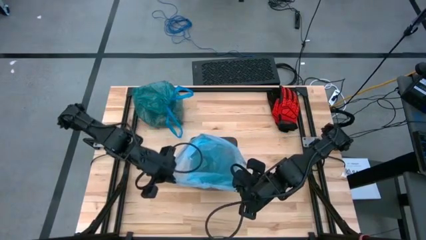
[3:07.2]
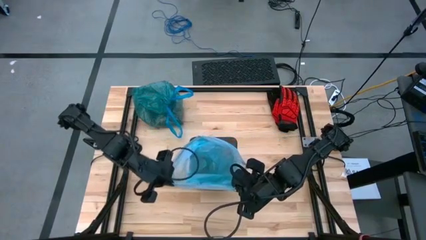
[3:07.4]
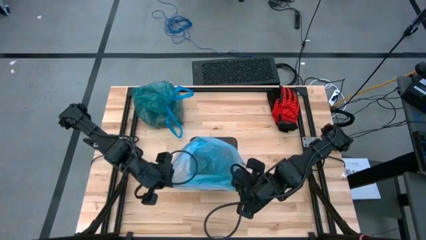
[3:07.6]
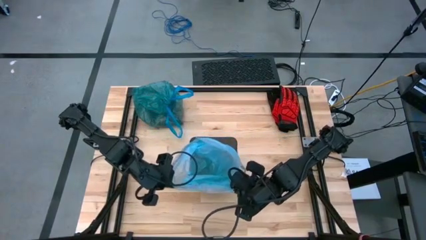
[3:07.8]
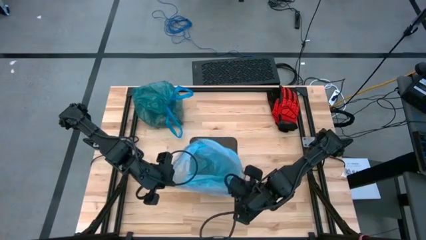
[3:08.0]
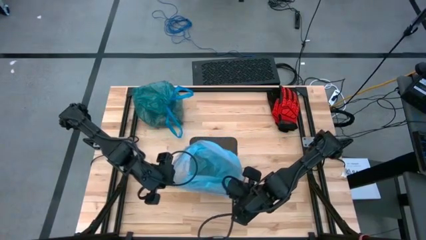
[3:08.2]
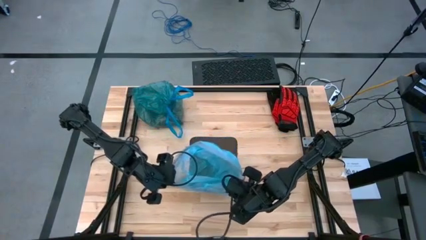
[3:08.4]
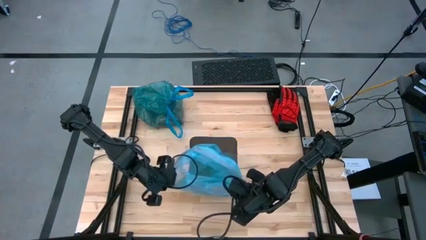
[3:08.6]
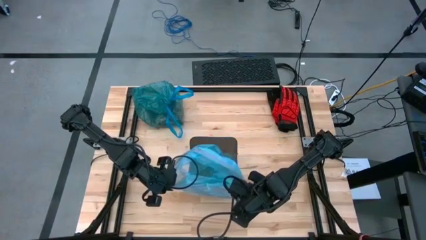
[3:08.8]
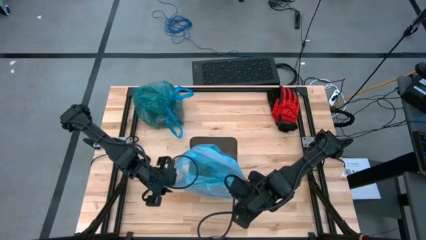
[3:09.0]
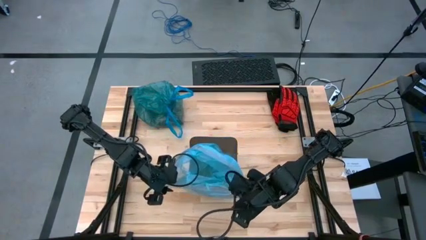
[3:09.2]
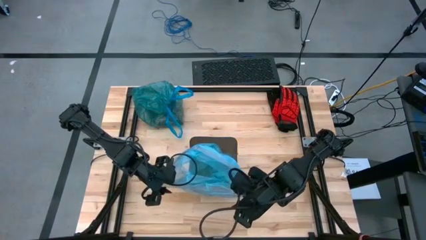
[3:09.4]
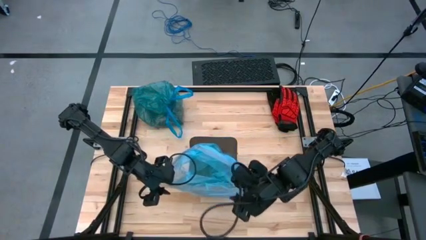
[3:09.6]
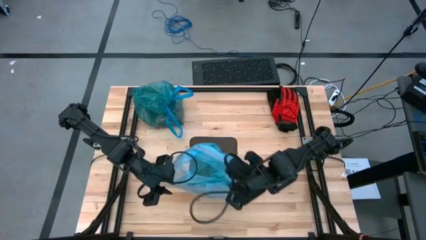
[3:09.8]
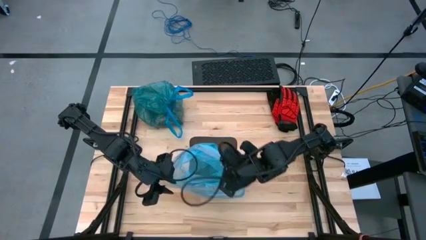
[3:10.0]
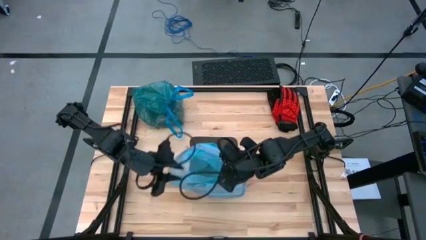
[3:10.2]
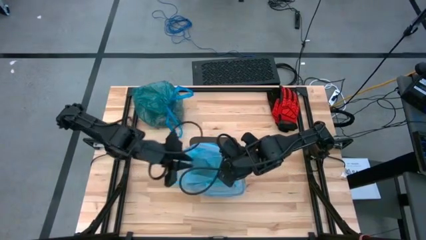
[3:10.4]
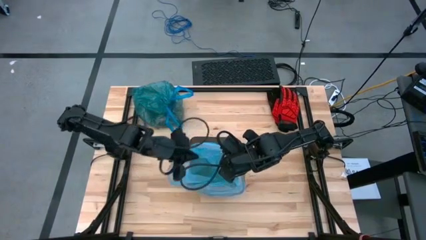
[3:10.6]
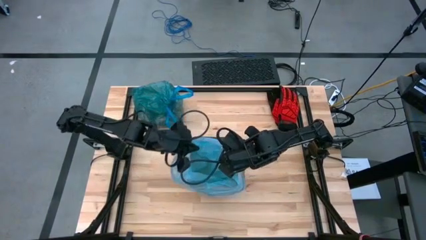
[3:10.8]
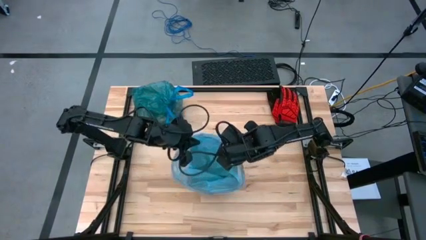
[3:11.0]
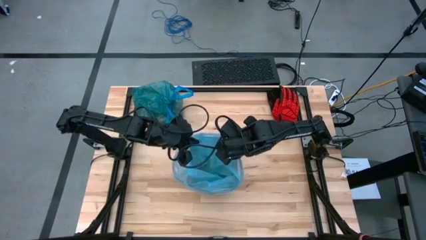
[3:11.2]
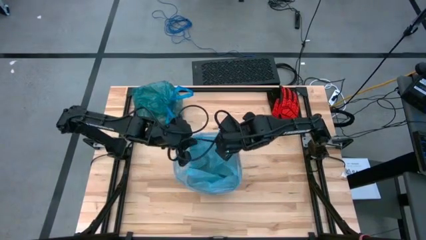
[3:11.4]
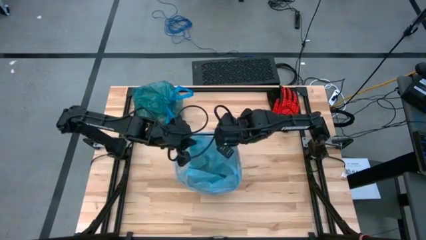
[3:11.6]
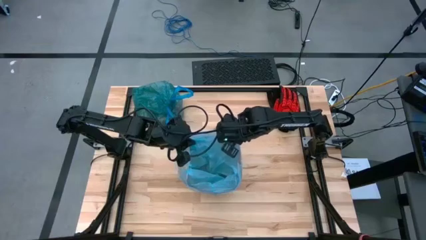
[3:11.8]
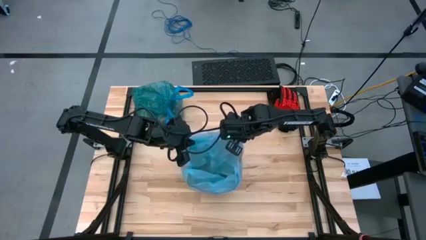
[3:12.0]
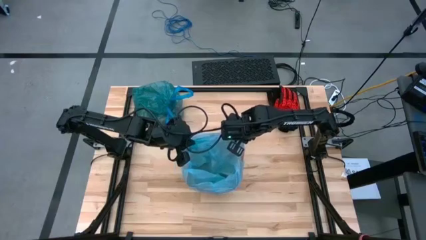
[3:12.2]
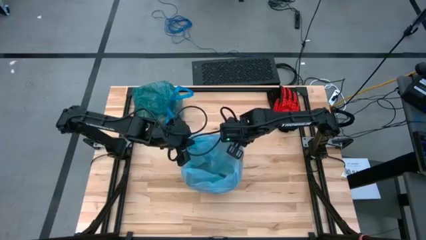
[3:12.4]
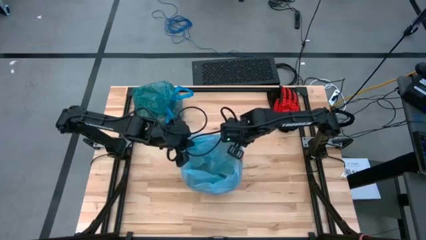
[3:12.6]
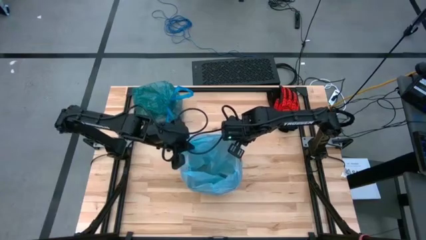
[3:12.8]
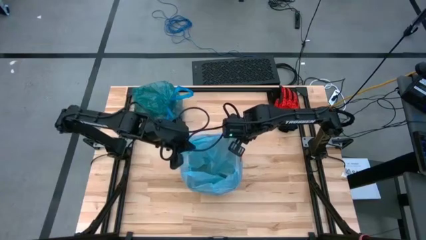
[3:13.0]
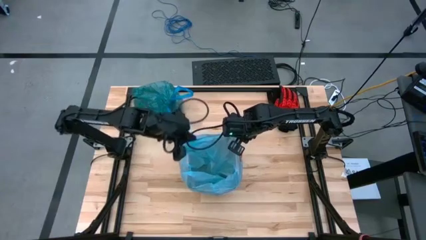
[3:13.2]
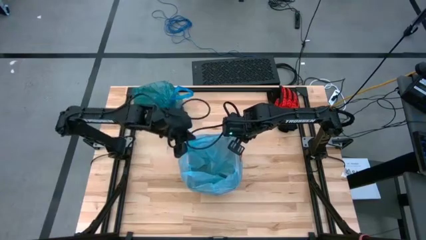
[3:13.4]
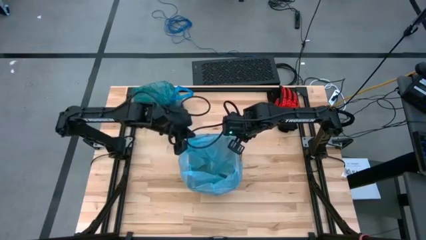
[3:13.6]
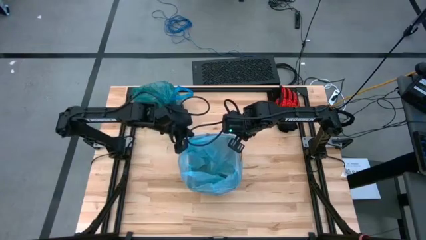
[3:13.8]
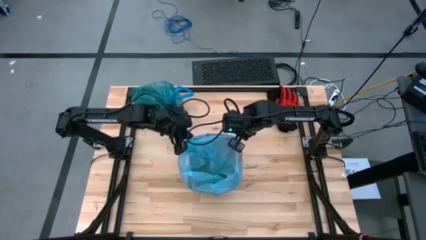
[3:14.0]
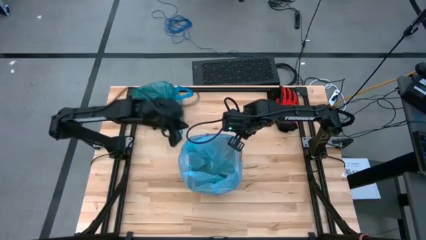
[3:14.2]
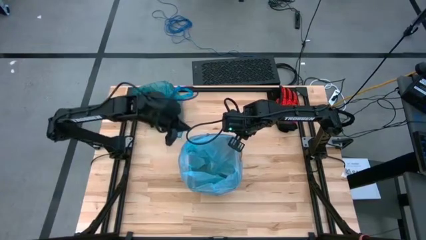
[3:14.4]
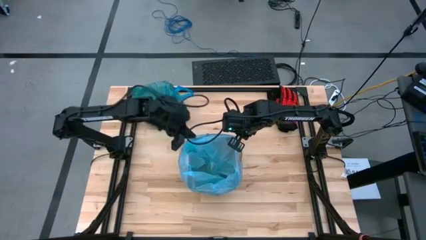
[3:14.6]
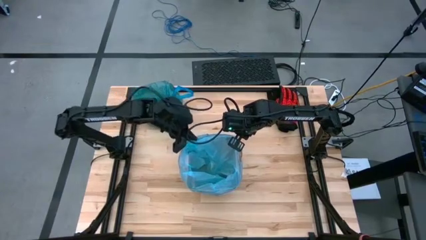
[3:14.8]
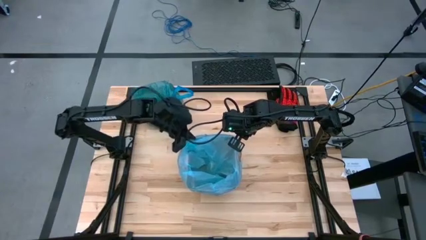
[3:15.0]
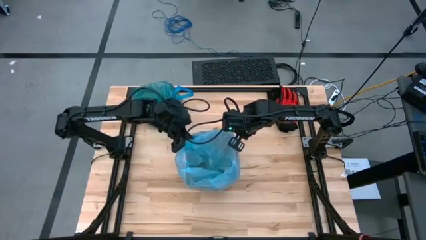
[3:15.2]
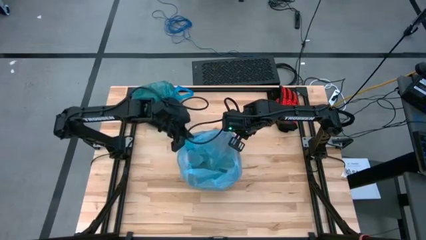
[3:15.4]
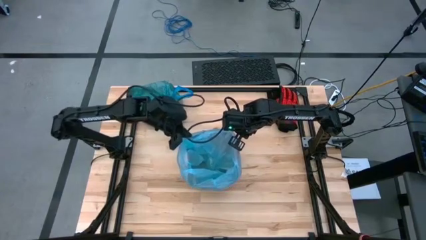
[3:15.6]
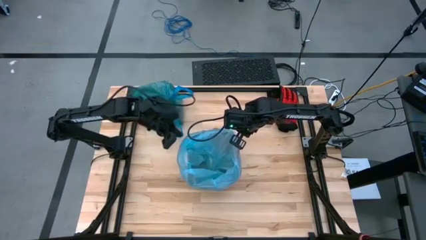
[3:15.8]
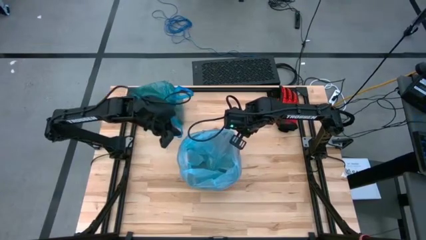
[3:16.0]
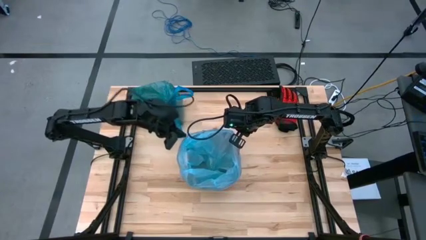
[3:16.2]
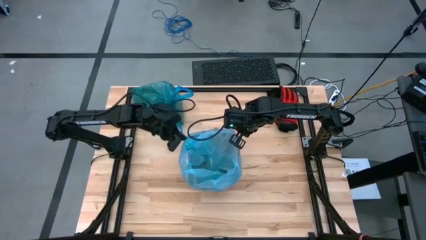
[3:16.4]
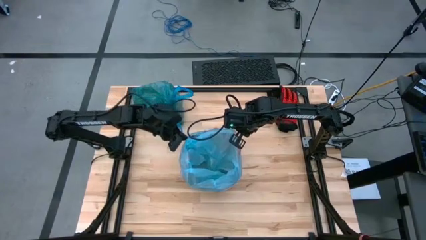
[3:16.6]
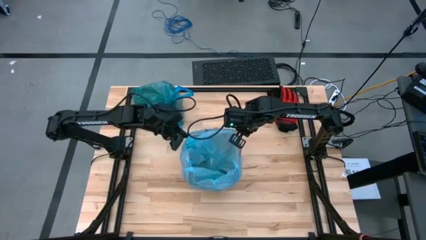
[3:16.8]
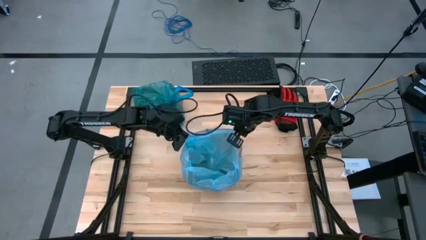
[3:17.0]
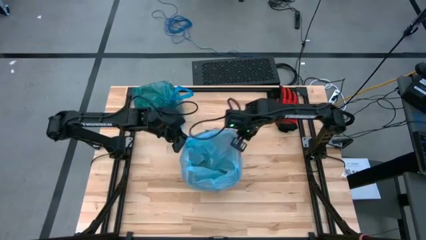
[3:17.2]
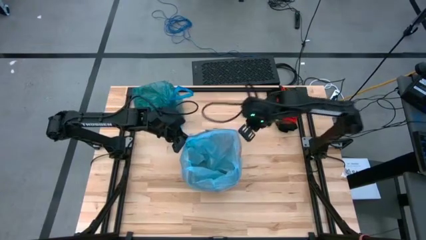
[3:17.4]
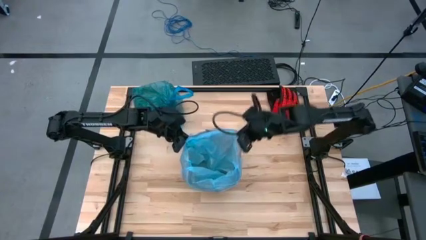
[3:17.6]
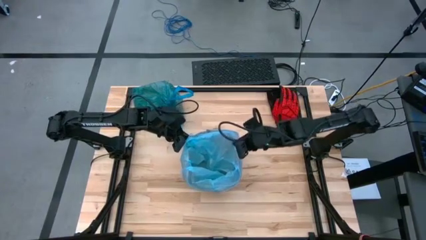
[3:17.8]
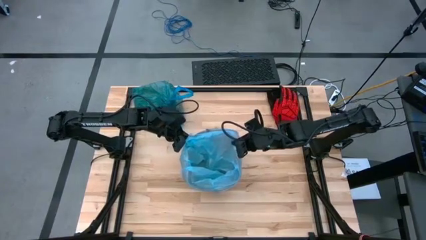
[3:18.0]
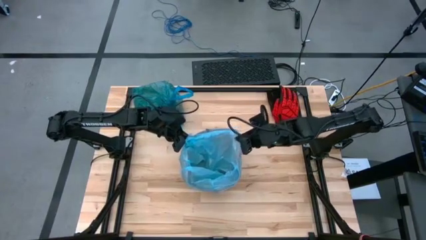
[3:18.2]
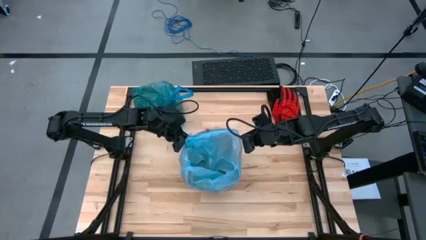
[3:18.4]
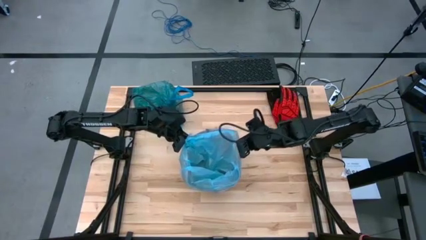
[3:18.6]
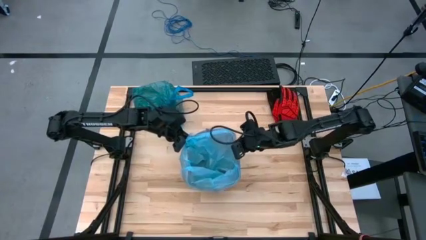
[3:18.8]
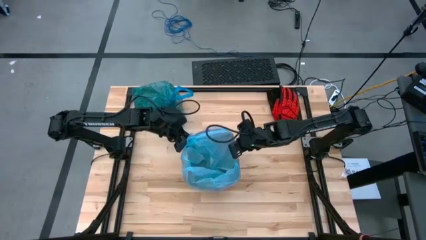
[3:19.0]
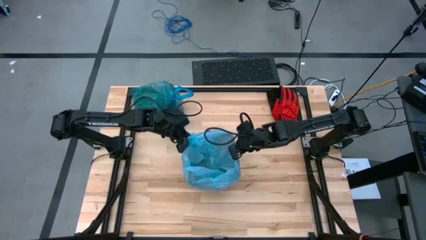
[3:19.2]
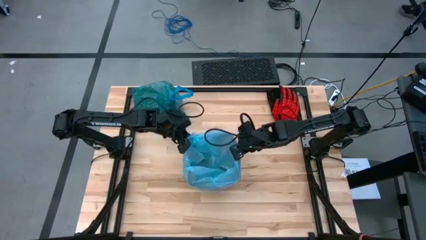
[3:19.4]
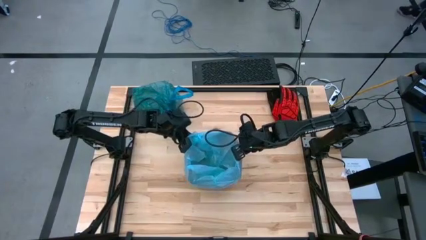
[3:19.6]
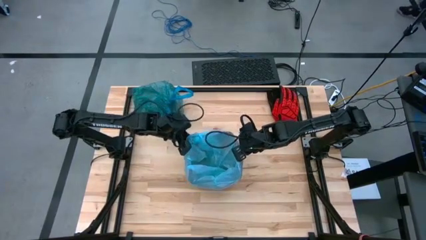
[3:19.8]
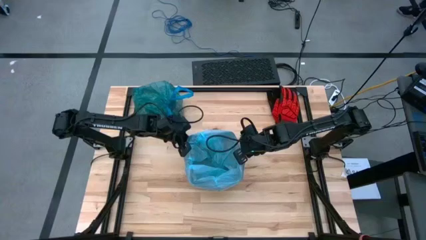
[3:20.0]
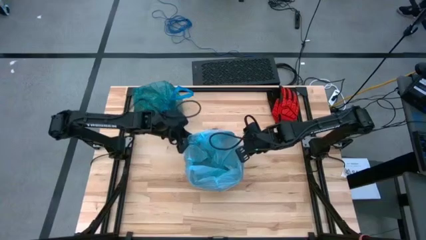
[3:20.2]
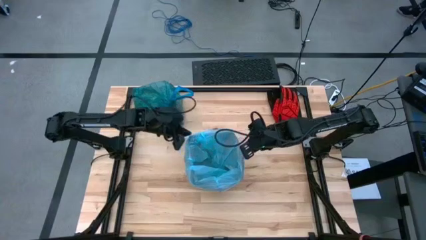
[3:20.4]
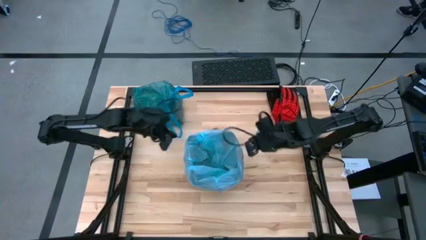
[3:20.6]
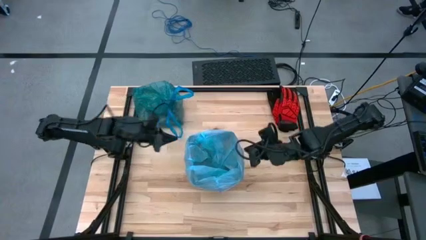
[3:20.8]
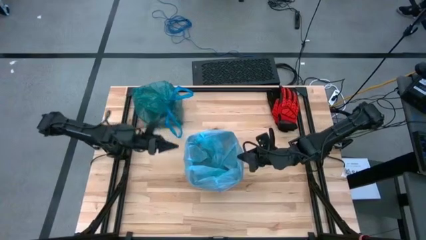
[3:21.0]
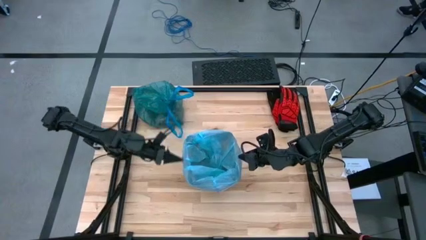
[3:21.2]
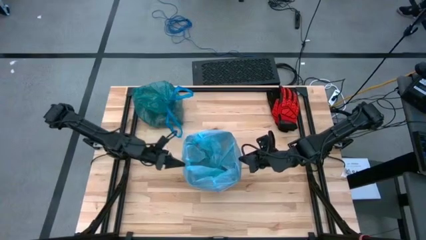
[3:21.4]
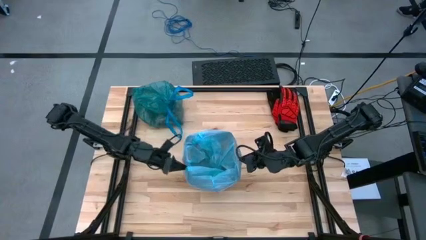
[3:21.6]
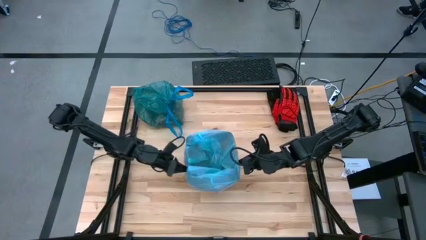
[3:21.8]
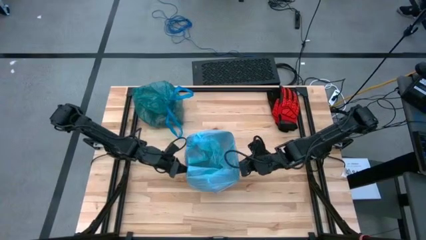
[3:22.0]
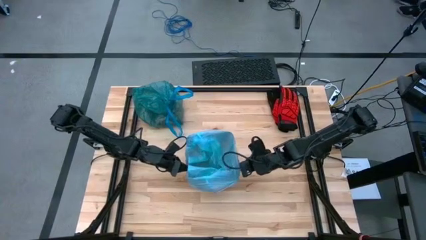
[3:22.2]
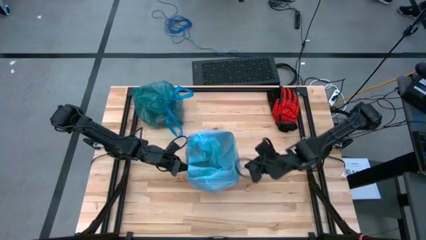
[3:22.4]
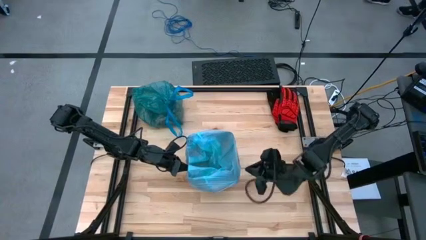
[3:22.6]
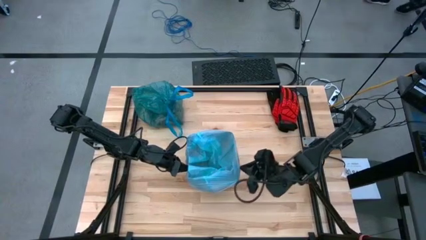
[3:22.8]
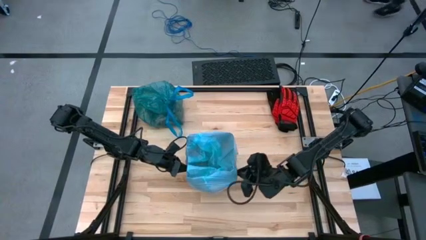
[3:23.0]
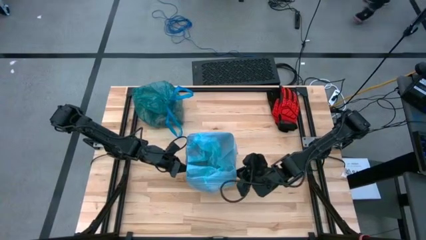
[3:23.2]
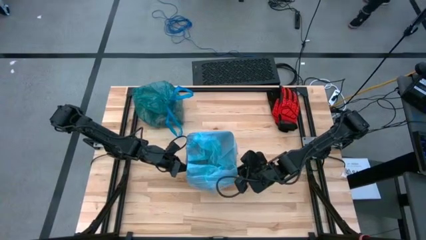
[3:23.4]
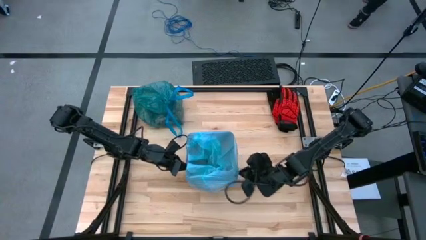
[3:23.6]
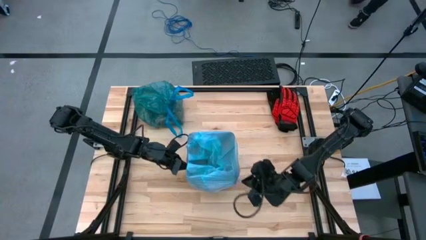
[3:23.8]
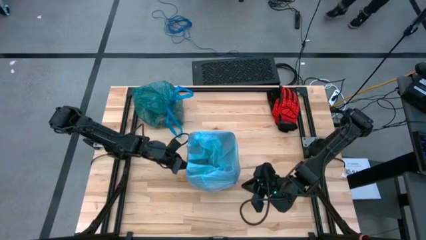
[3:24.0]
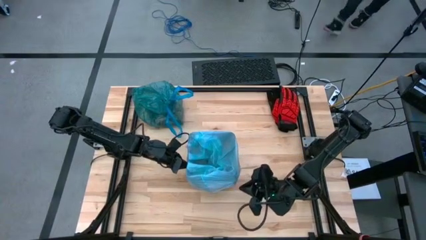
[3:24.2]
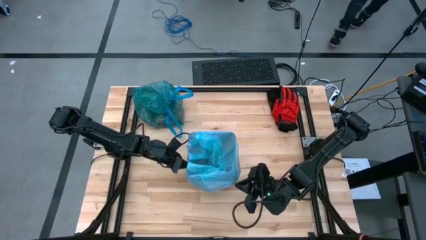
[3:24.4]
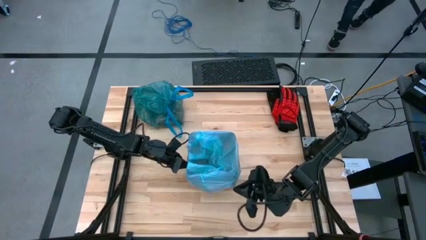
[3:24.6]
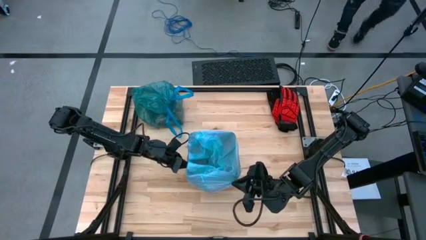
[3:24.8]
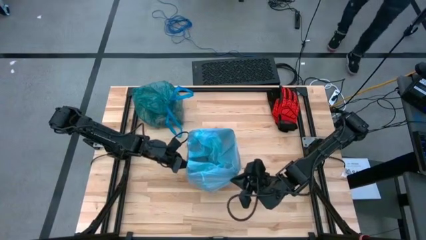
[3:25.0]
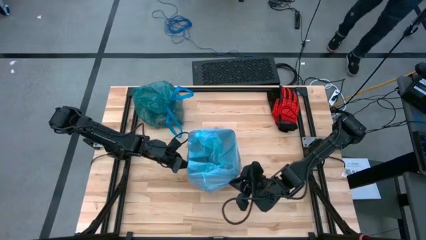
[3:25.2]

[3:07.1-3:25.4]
Task: place trash/remove bag and relplace
Insert the new blue trash bag into the trash bin
